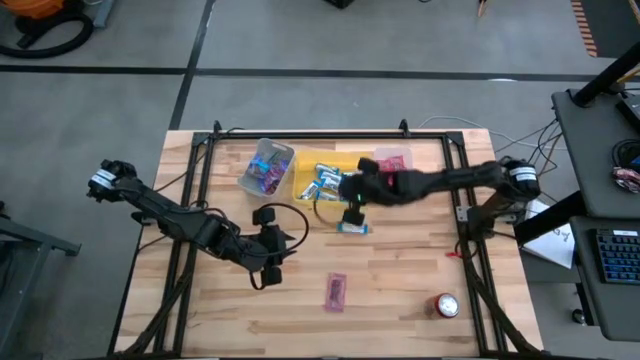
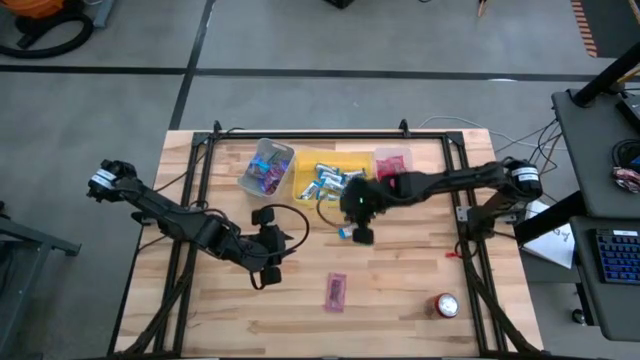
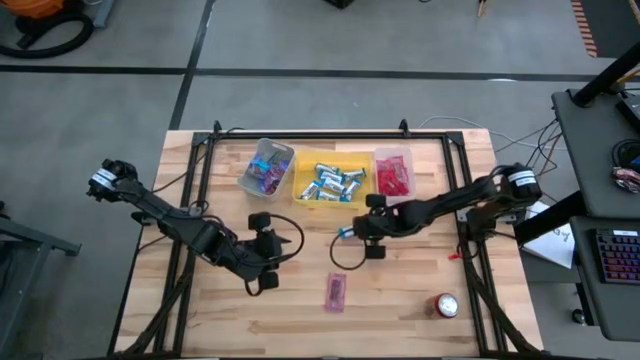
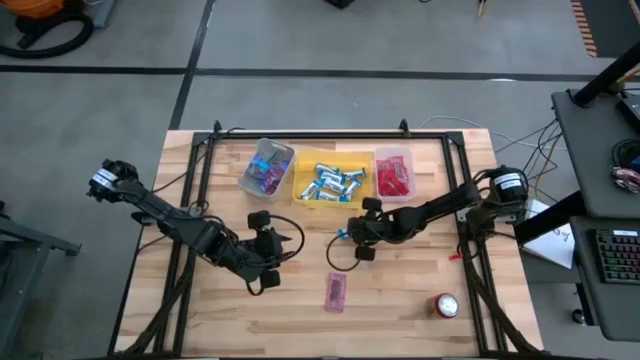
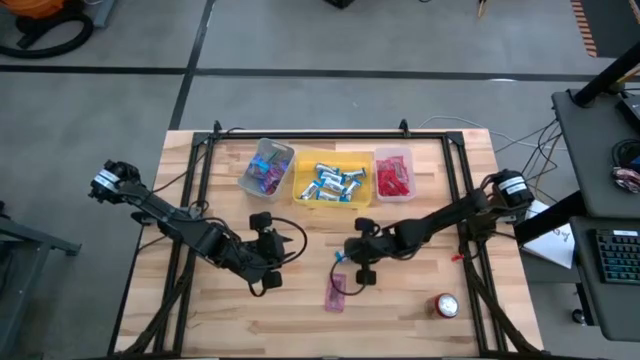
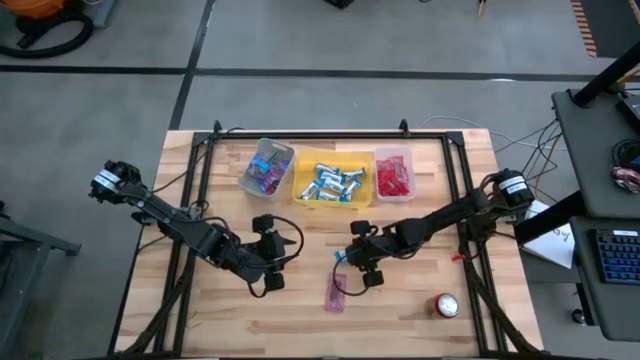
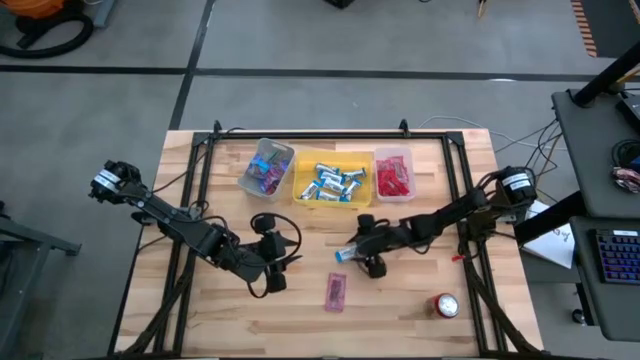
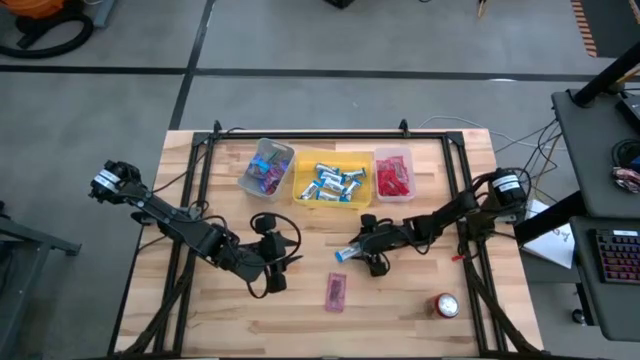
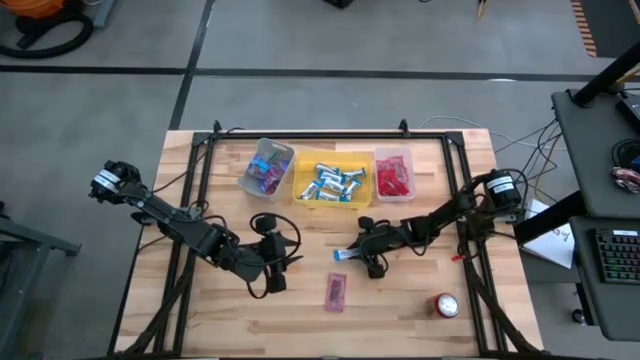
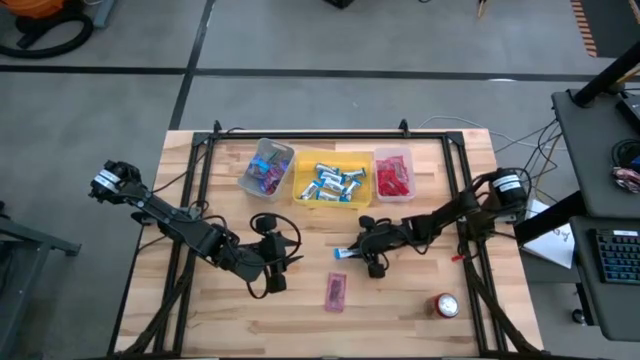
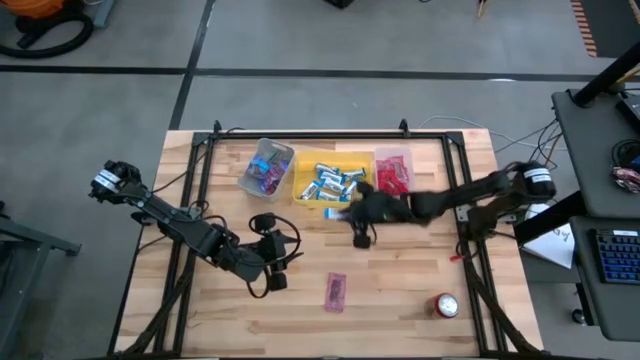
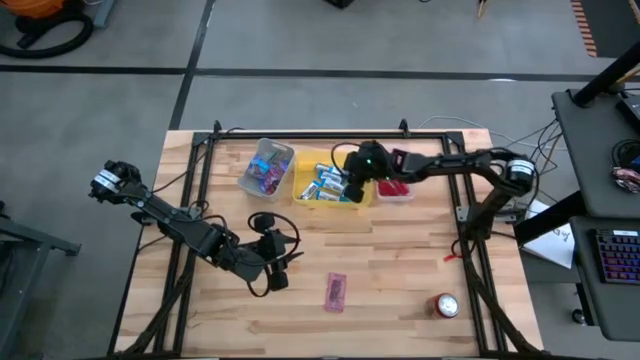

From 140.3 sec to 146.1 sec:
Task: Sort candy
Put the white chocolate into the yellow bin

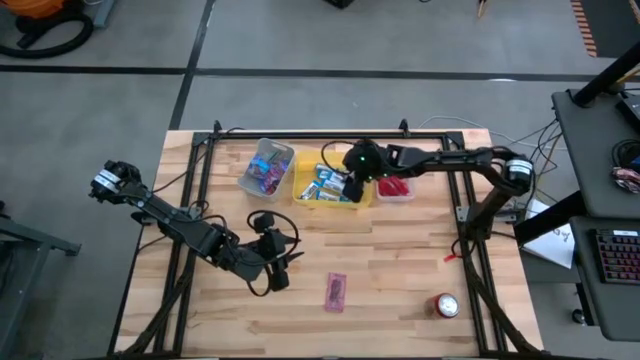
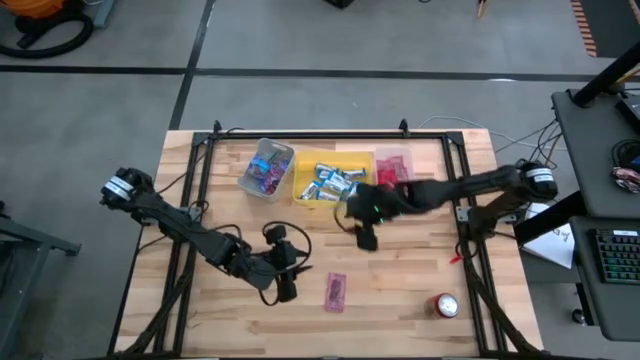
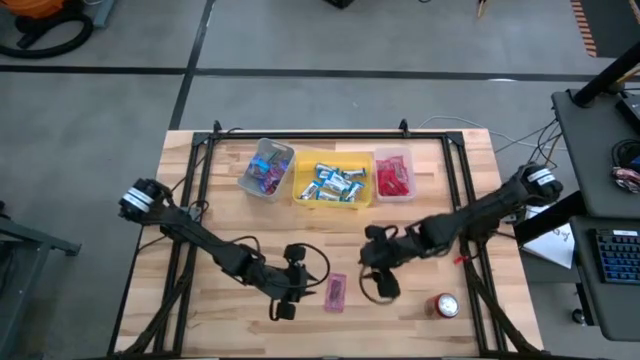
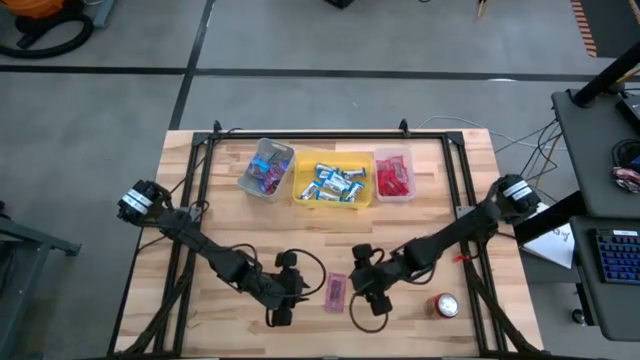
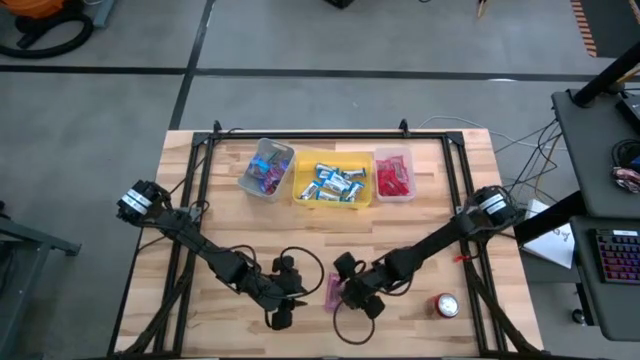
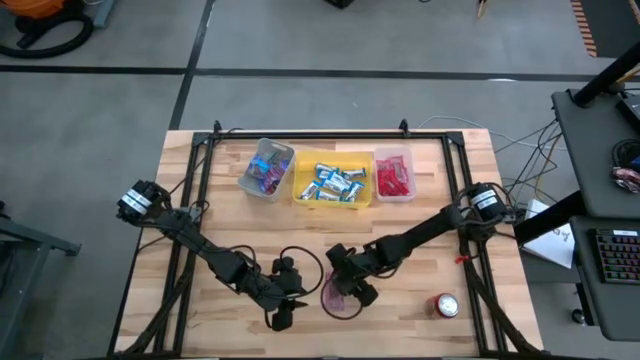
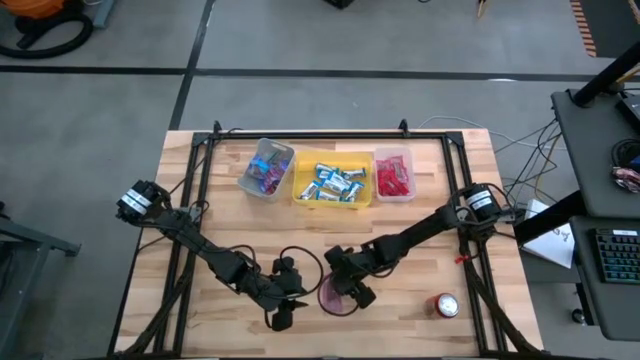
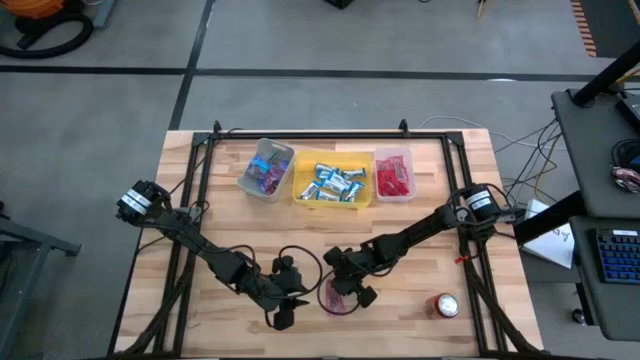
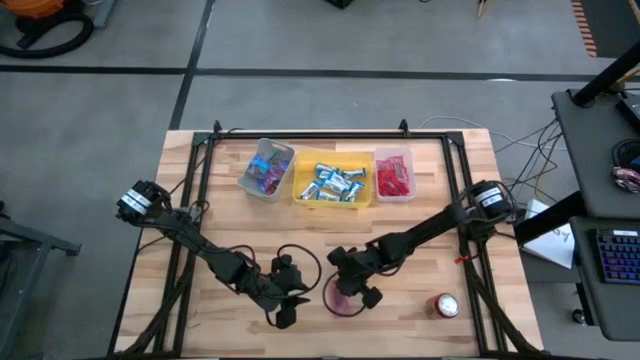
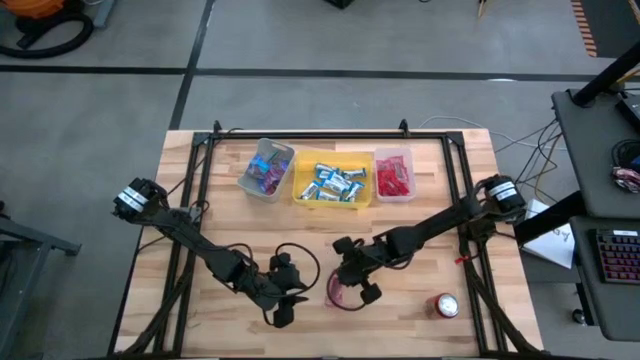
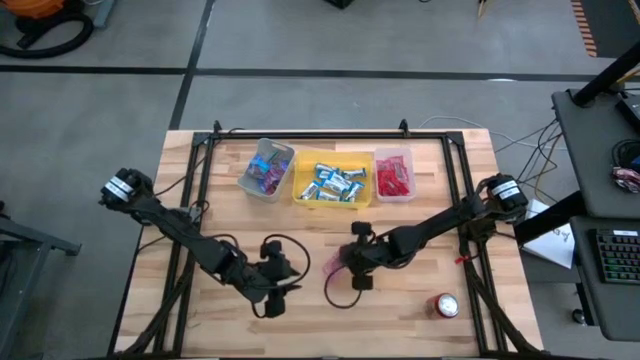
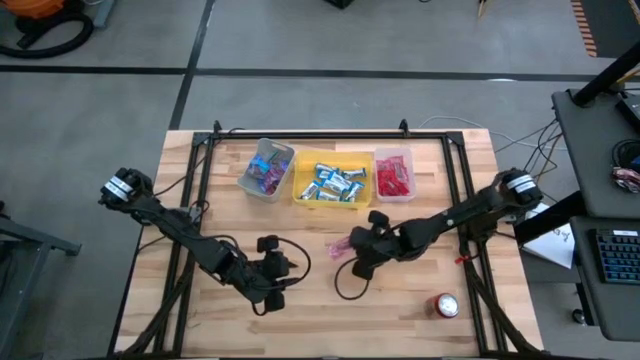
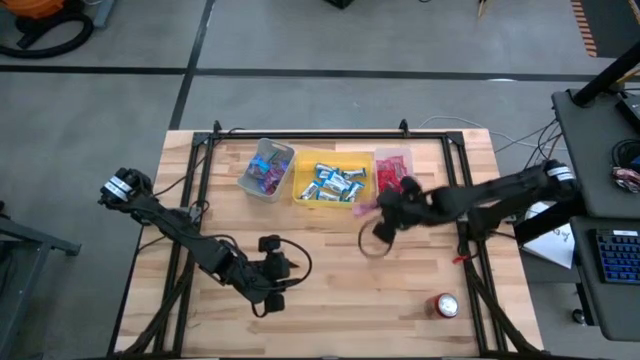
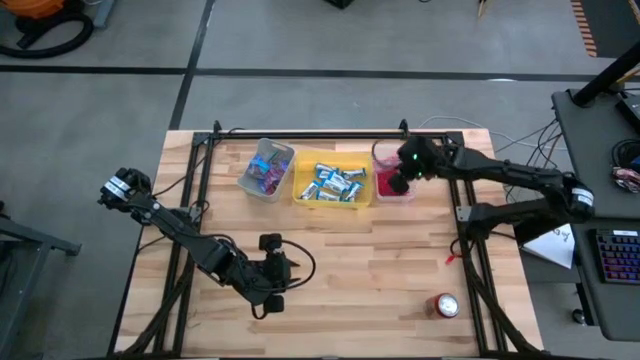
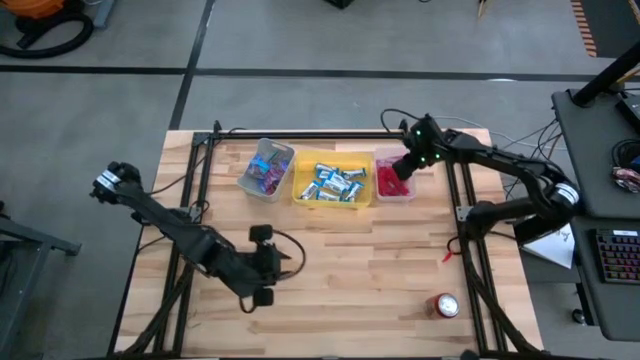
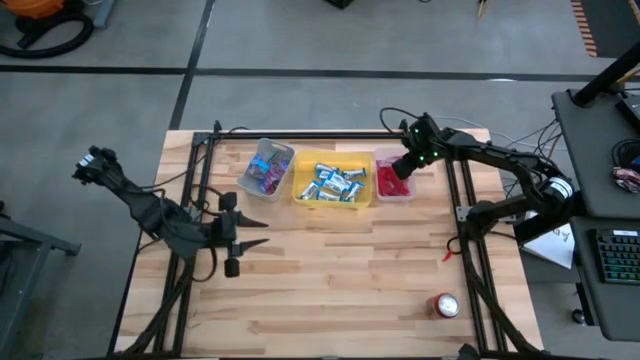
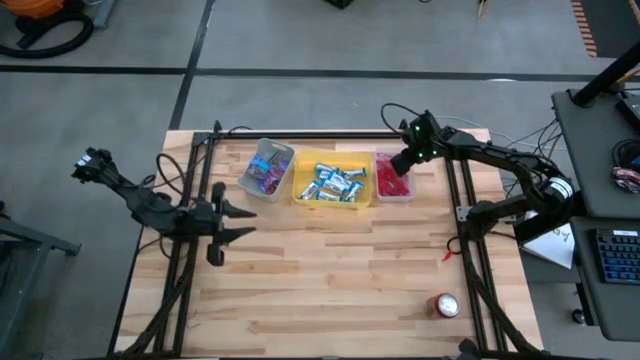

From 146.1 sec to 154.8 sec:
Put the red candy into the transparent bin

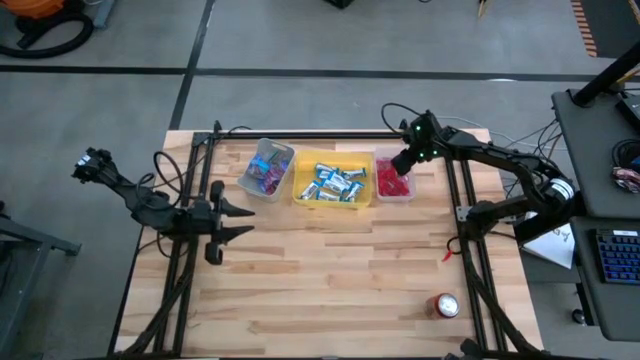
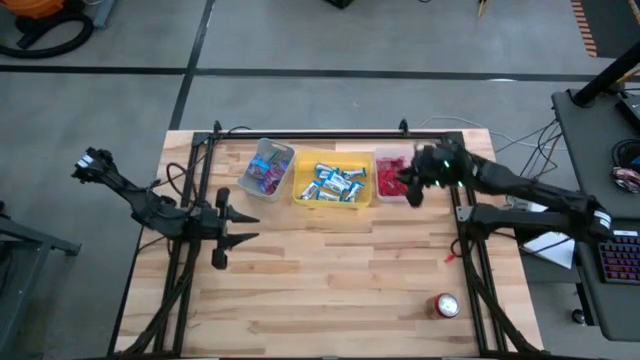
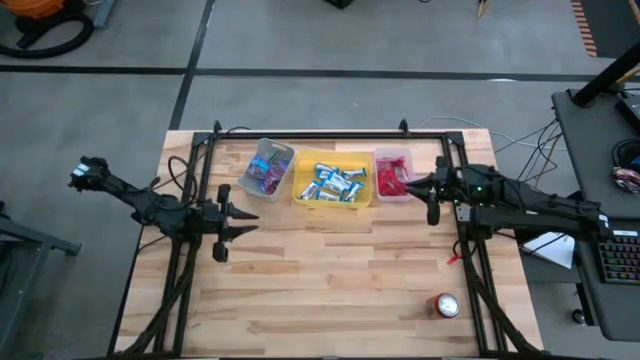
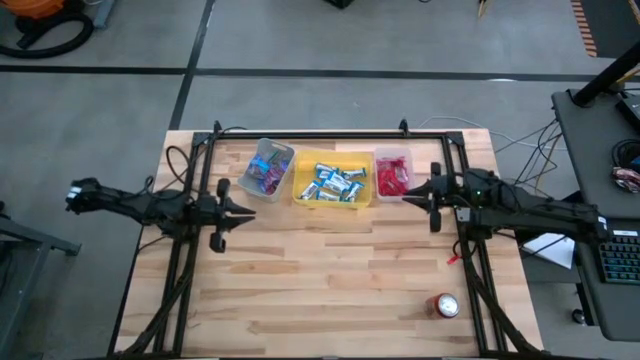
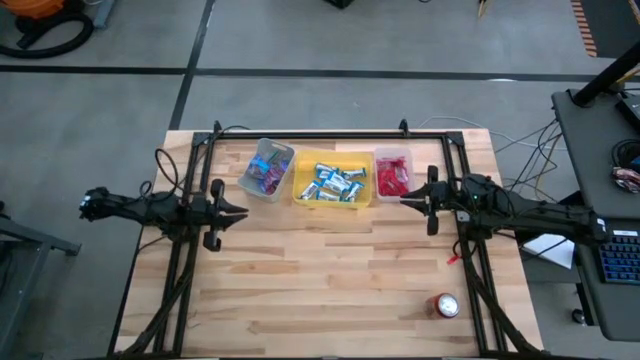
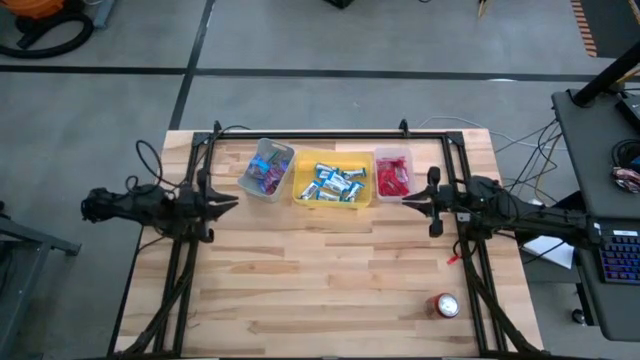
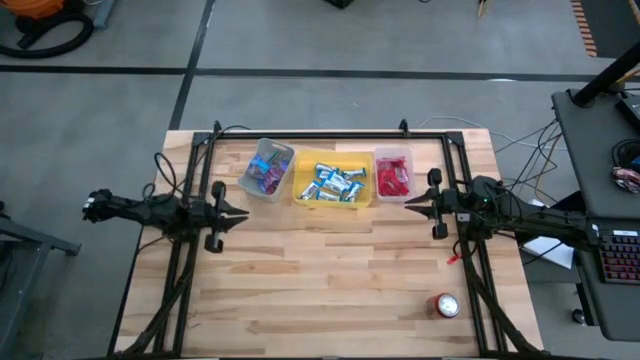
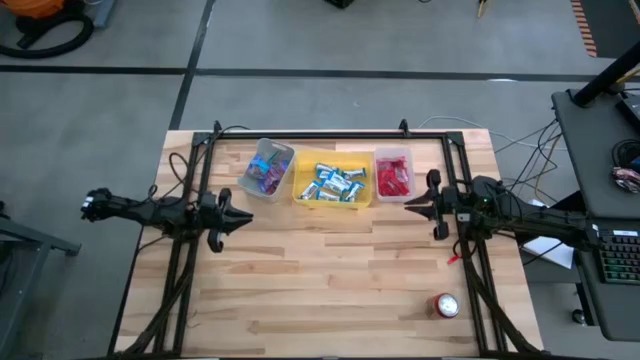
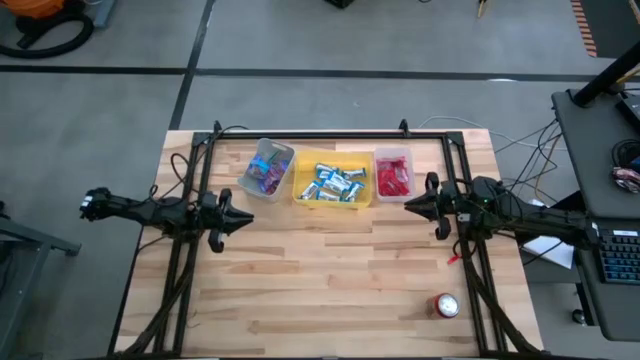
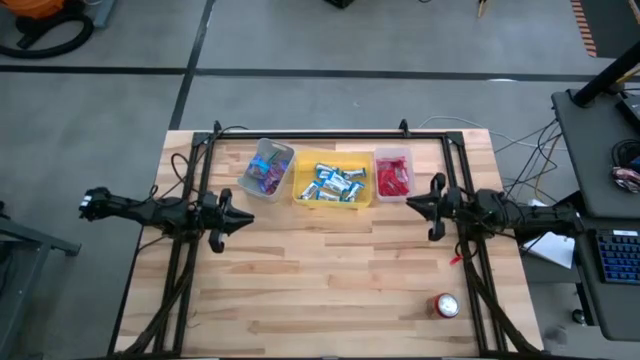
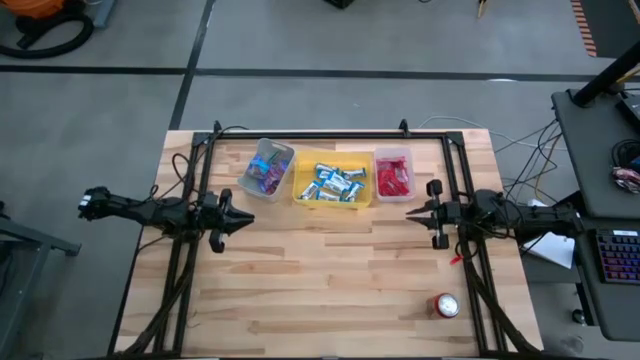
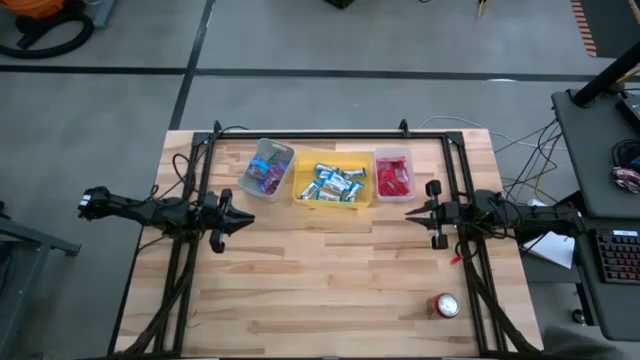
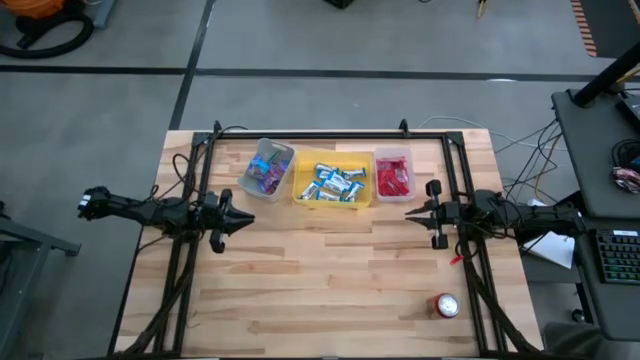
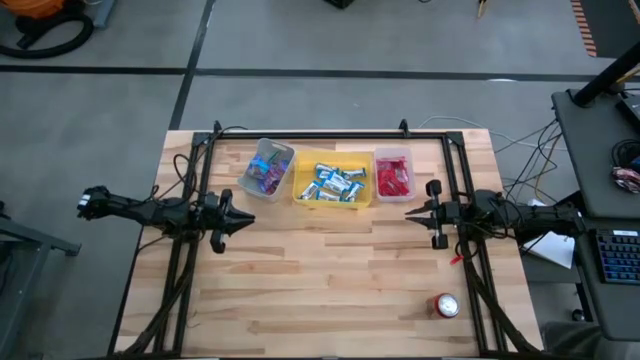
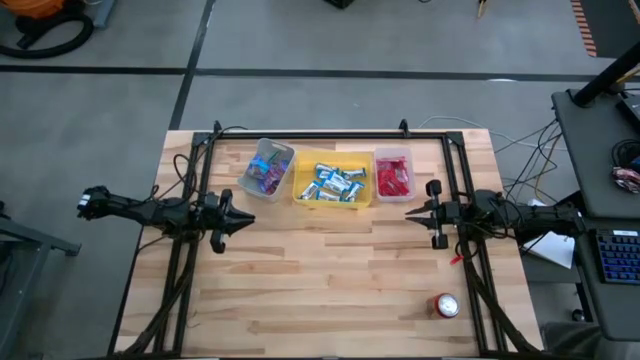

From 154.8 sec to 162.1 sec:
Return to Home Position
